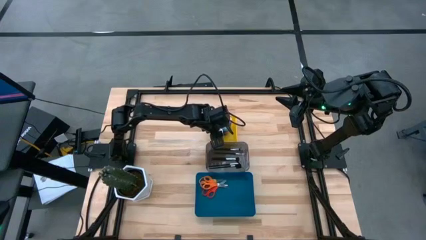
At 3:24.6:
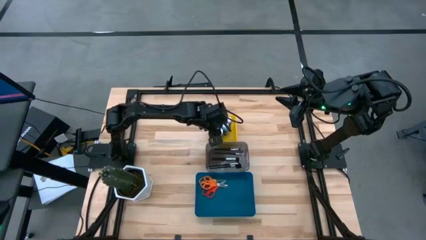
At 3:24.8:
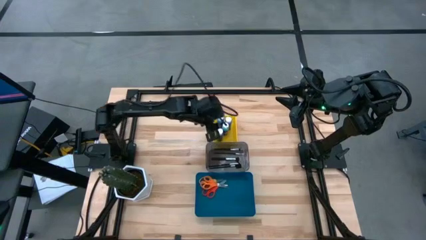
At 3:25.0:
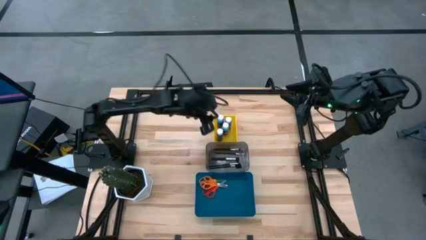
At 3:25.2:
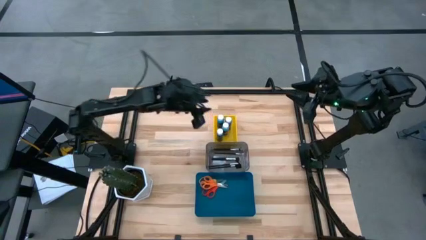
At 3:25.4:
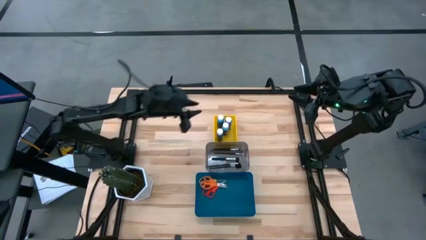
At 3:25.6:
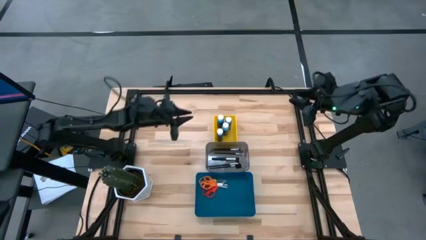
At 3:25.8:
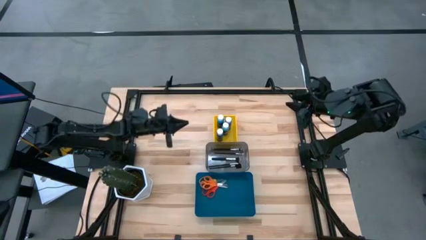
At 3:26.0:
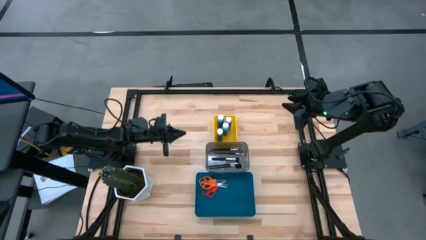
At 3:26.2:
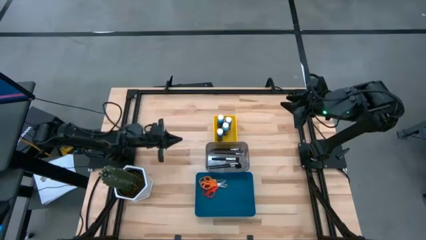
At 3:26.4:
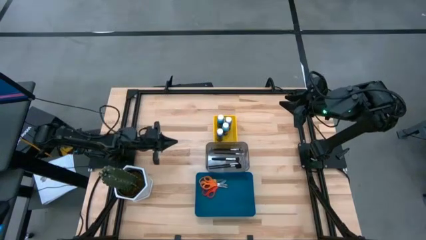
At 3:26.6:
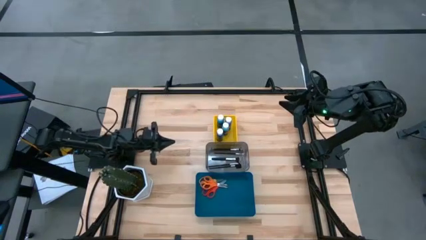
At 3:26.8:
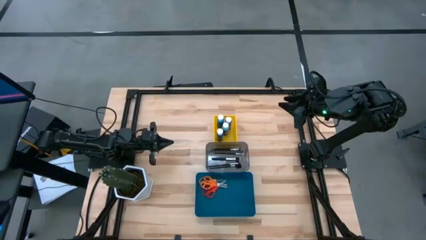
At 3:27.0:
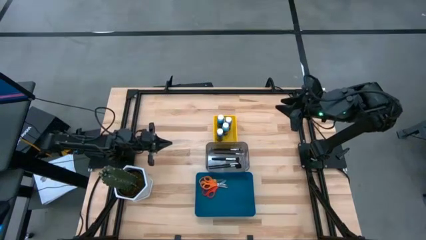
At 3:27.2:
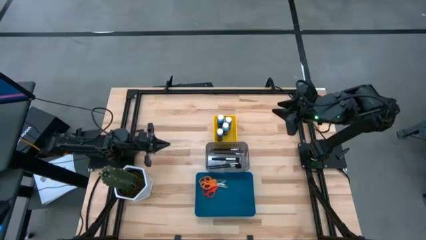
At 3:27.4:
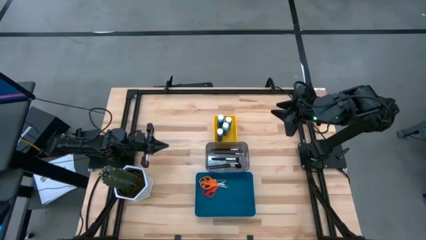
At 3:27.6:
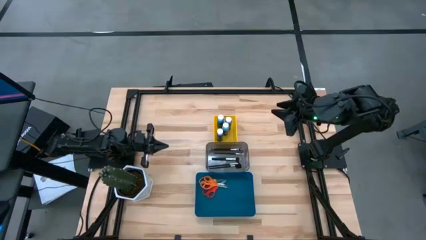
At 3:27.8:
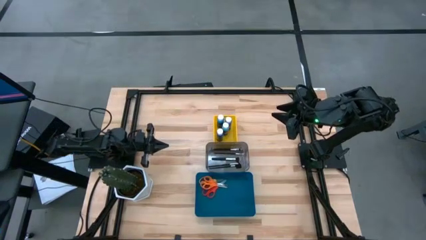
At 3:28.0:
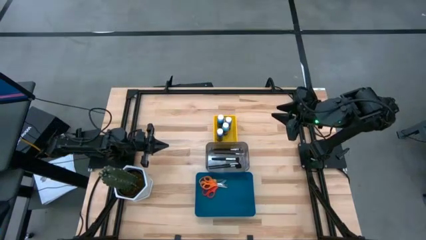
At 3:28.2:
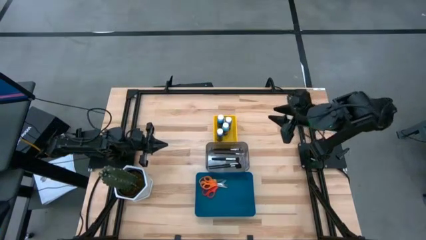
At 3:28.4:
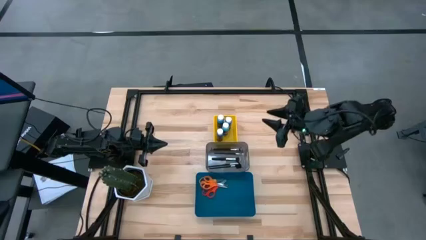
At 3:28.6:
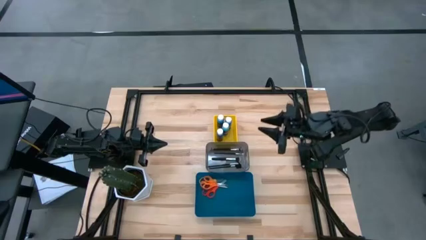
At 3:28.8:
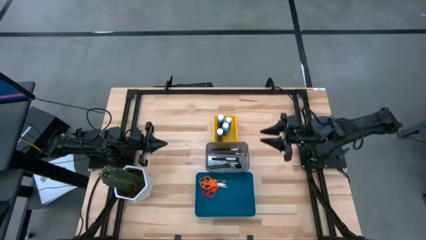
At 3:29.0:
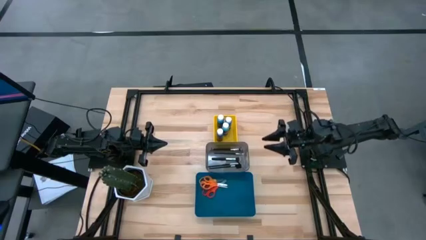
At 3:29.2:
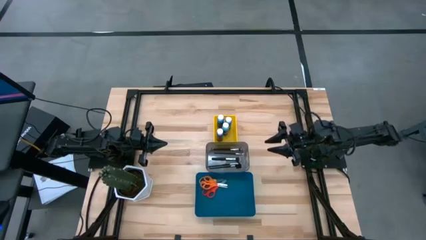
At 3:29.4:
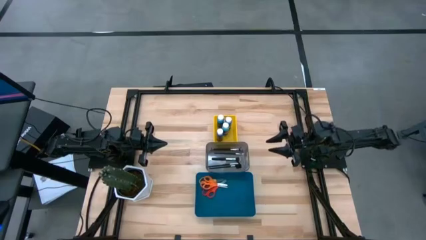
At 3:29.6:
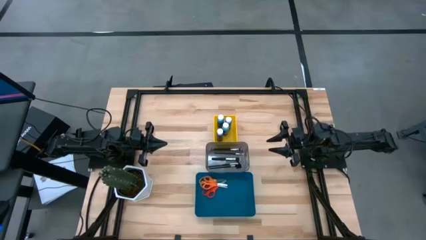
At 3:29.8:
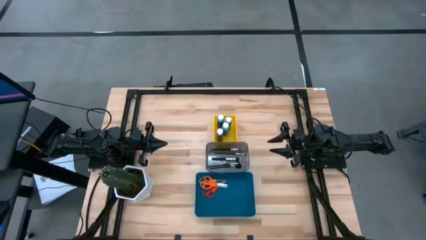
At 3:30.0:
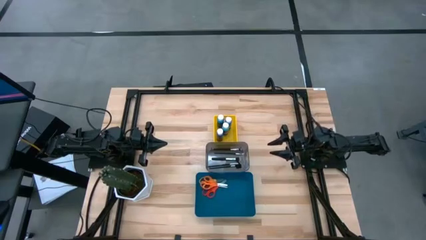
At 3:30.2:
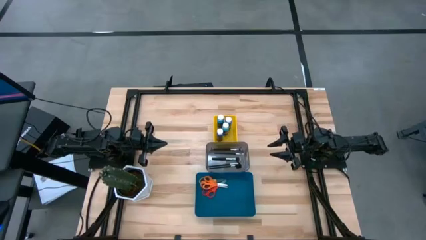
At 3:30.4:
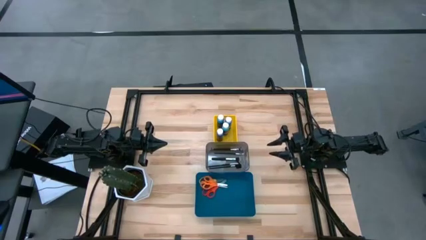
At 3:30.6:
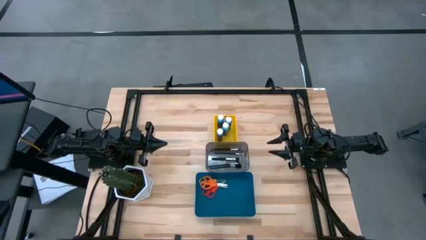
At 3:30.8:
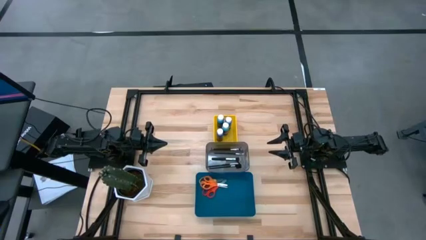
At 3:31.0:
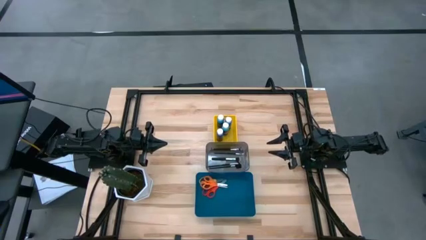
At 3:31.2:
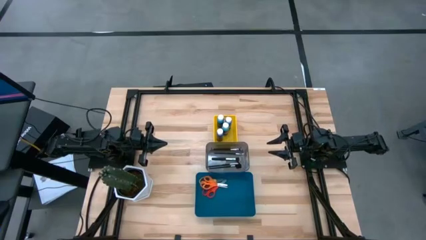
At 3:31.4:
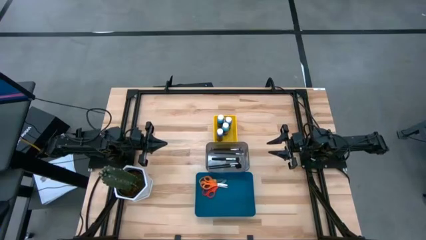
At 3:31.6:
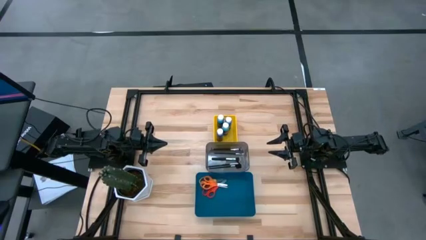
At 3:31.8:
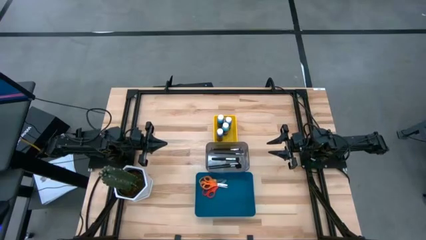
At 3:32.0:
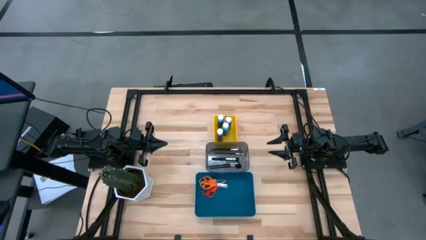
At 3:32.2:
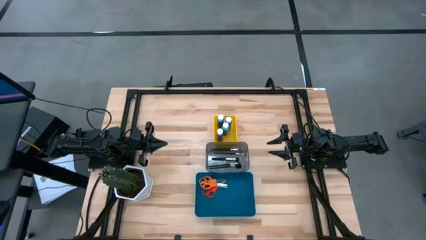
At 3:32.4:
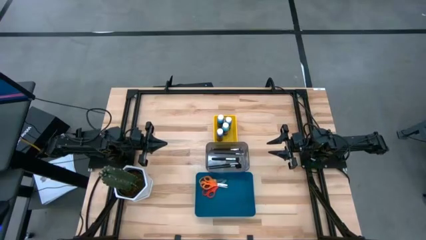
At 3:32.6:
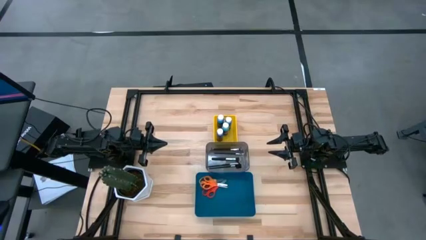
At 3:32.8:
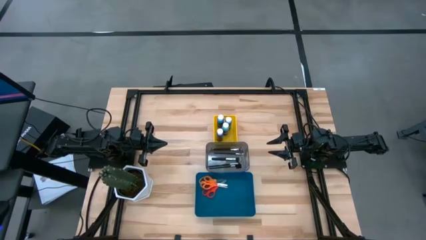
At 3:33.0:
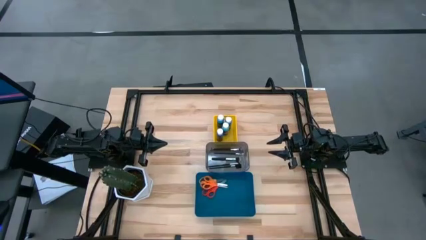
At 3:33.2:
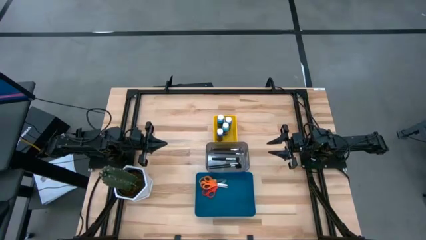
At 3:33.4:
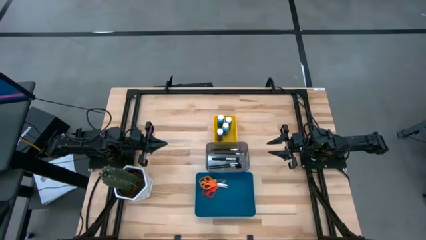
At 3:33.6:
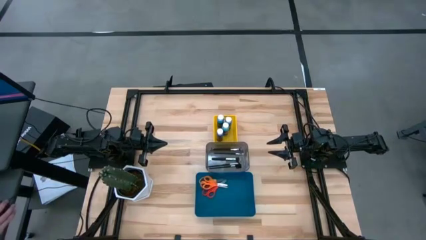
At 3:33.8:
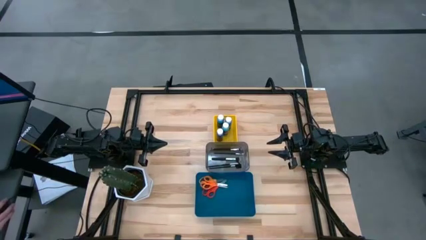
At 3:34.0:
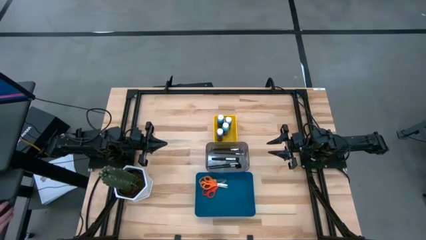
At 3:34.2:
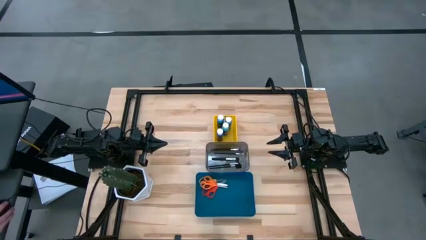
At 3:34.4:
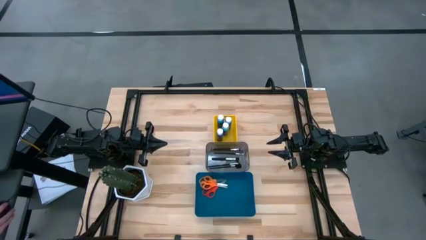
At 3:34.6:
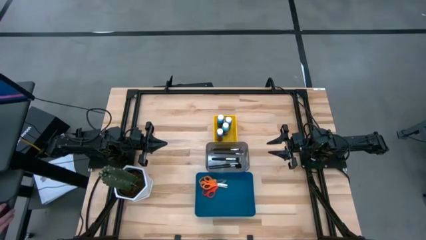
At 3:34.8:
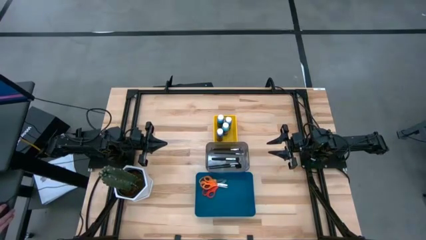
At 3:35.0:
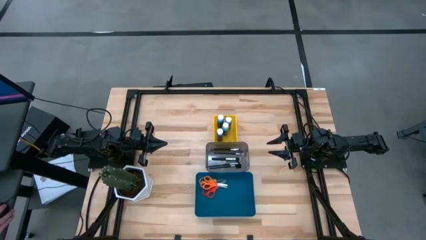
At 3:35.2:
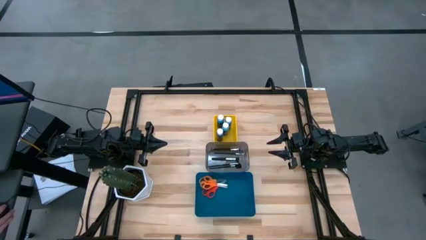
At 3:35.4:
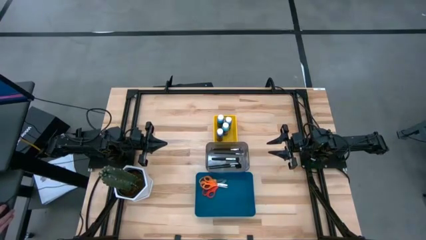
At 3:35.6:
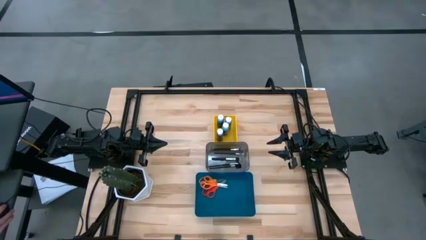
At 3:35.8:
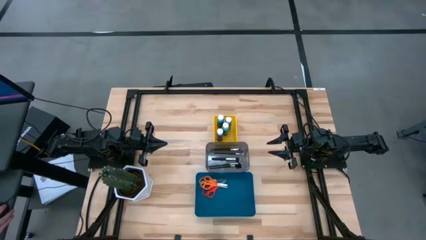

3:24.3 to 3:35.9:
Task: Pick & Place Paint Supplies
Return to Home Position
